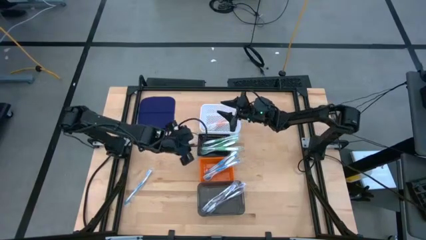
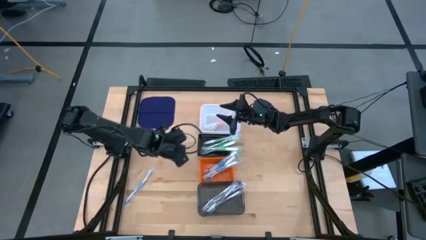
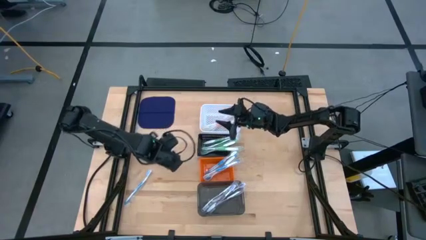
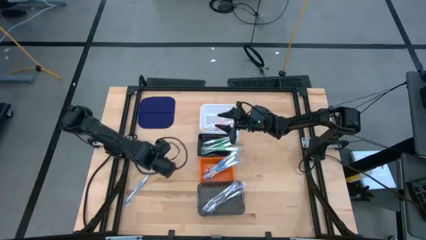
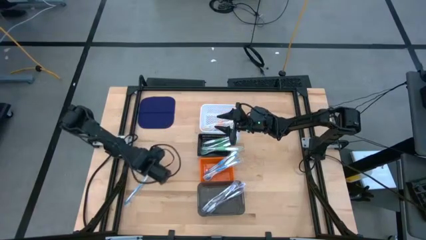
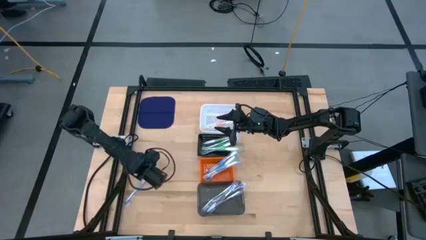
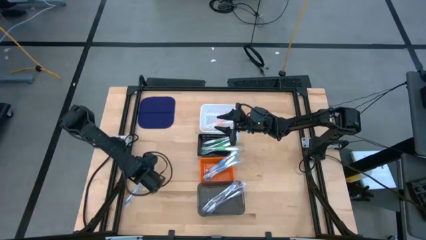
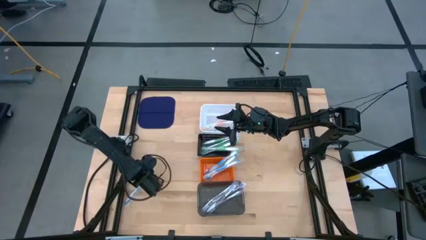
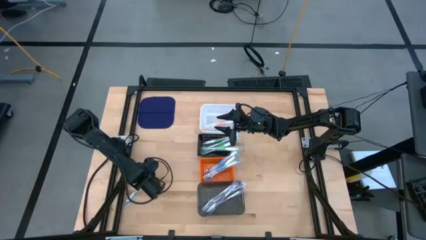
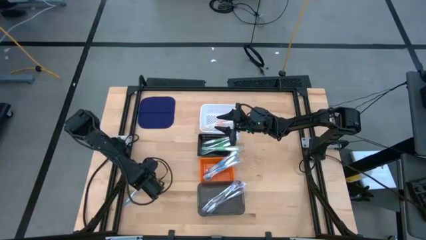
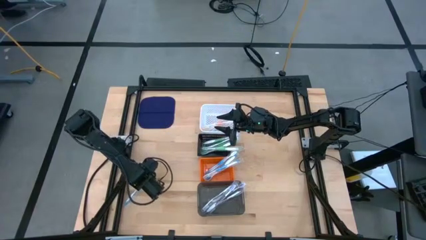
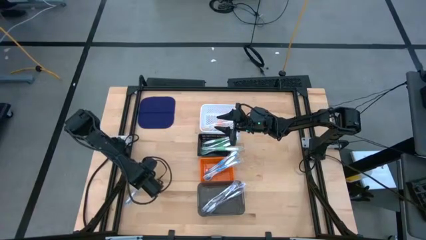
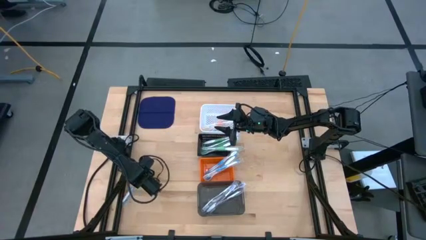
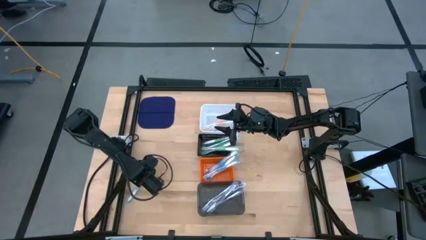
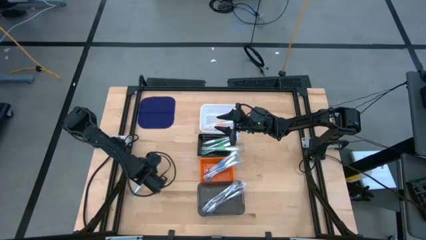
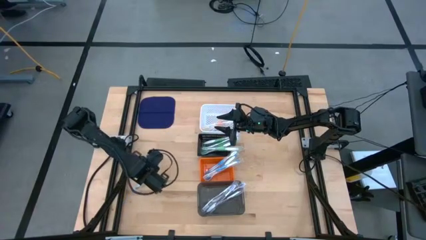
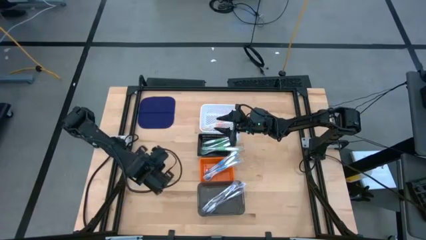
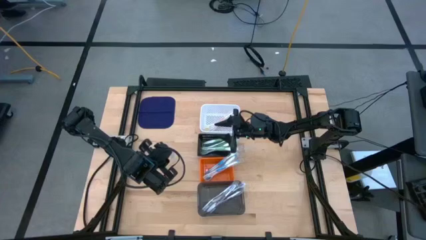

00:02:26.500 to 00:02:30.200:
Task: Pick & Place Toothbrushes
Put the blue toothbrush into the orange basket

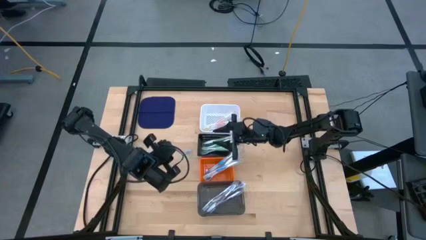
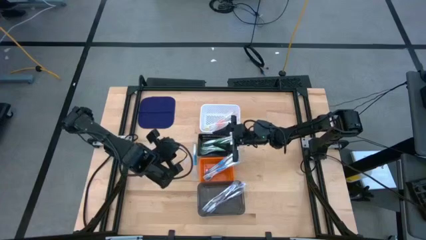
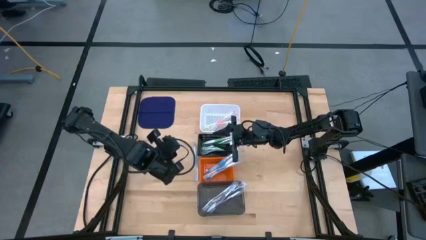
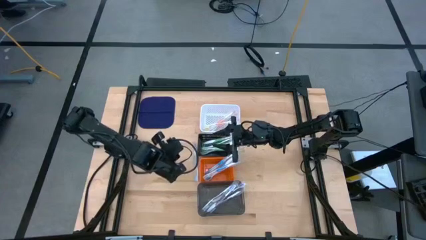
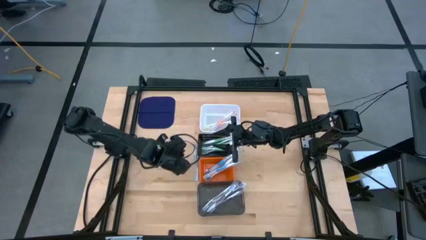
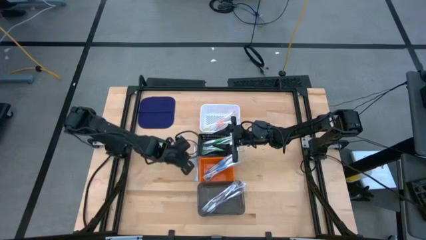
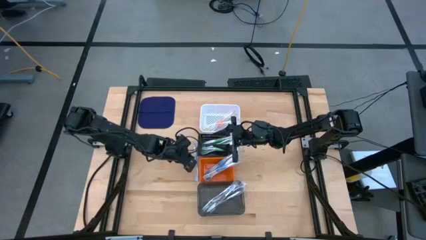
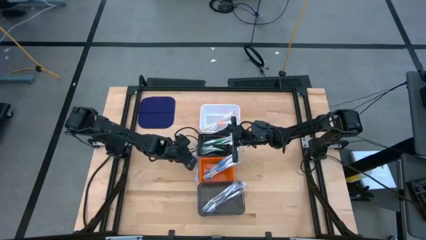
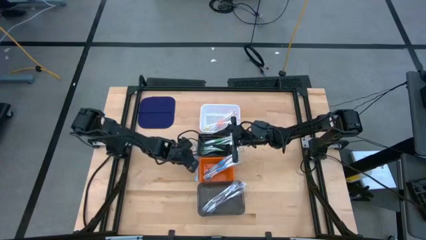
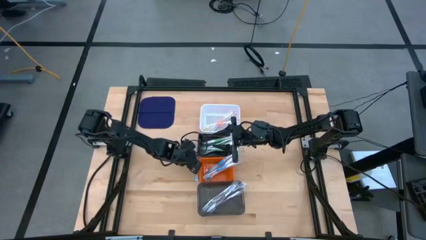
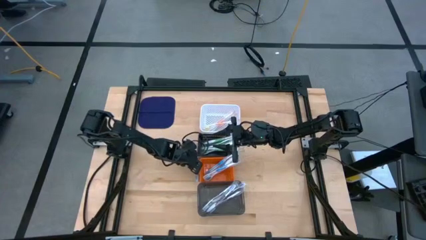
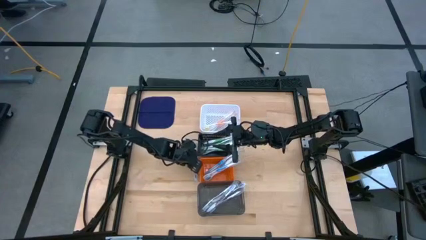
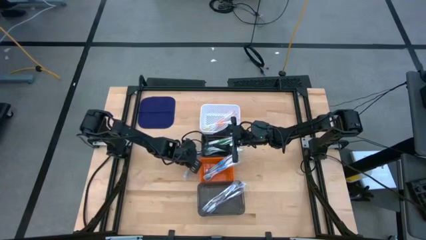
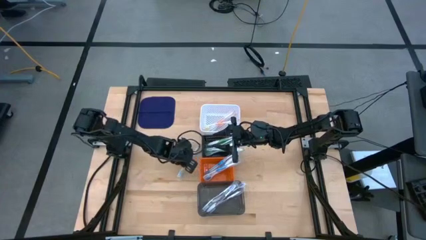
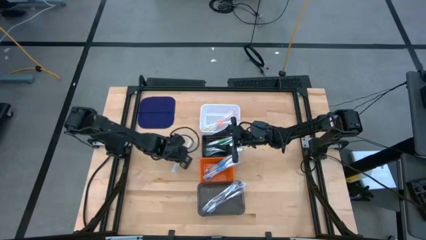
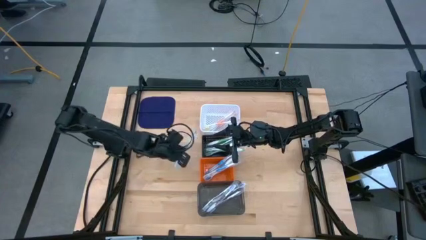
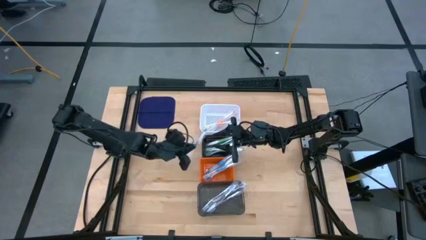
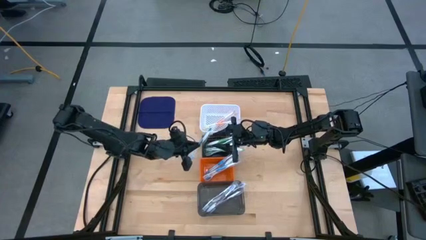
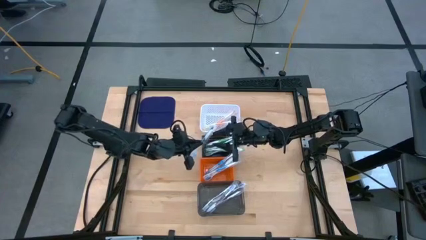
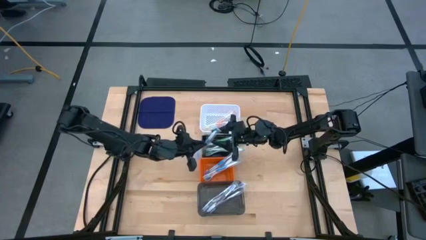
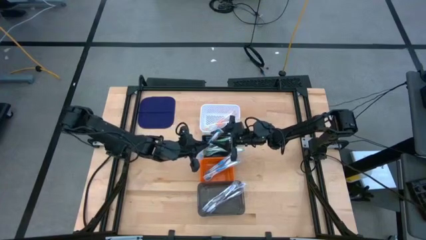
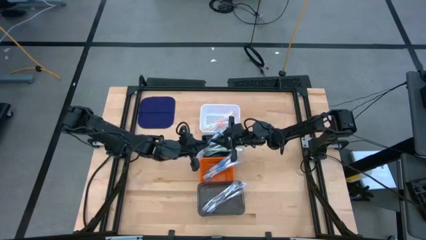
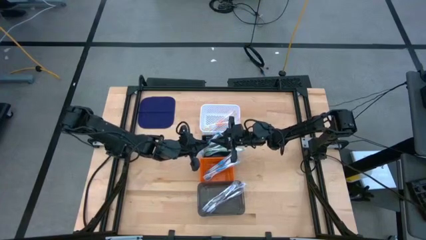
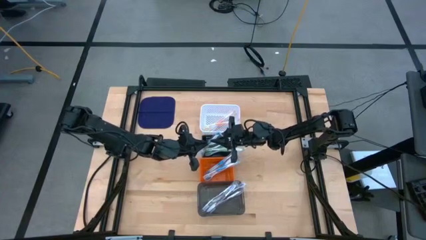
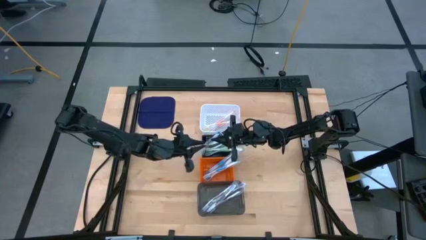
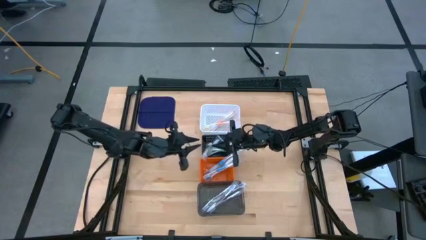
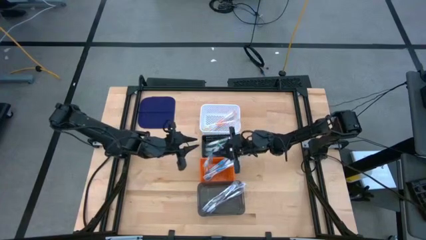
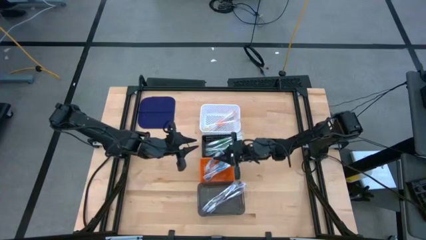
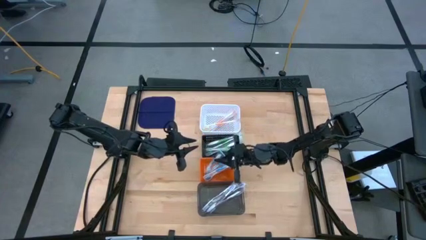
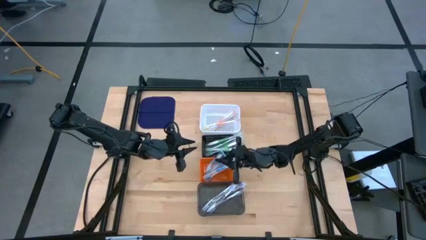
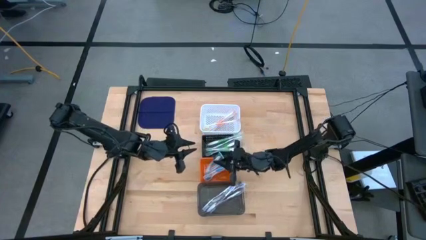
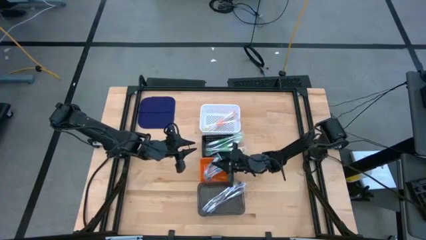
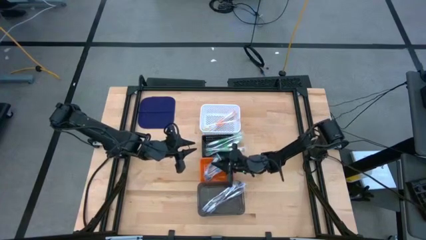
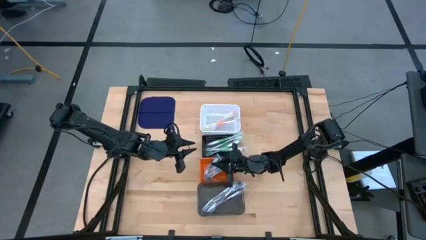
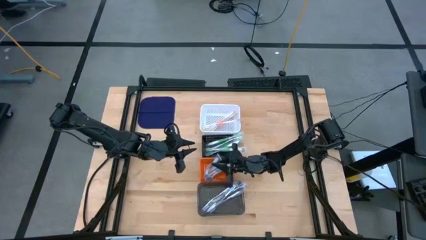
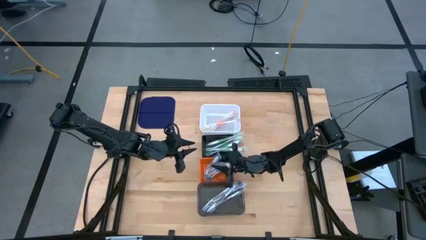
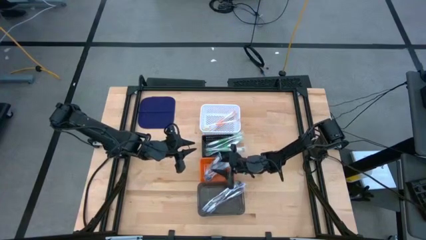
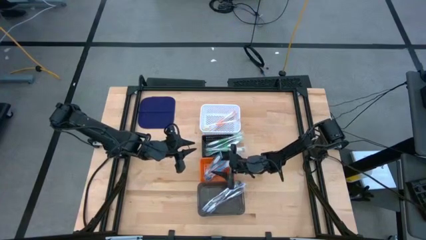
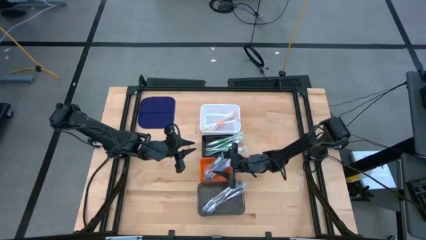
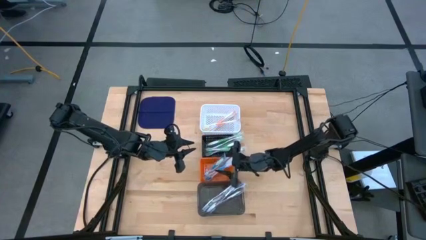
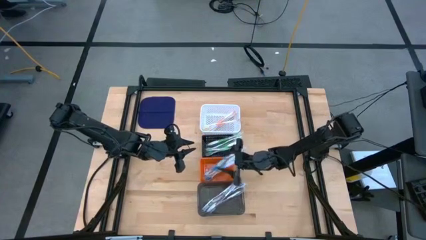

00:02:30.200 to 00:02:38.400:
Put the blue toothbrush into the orange basket

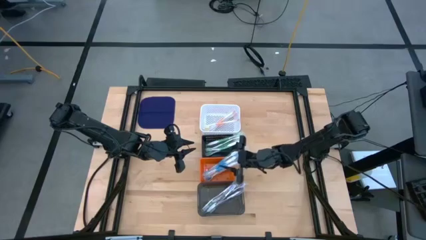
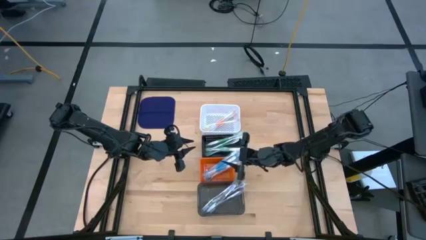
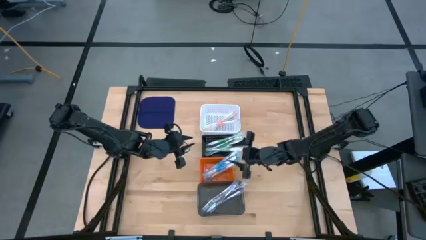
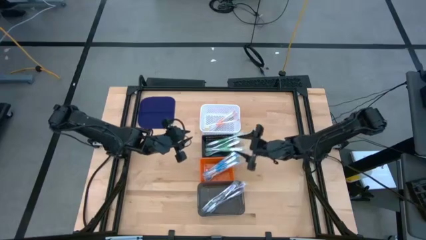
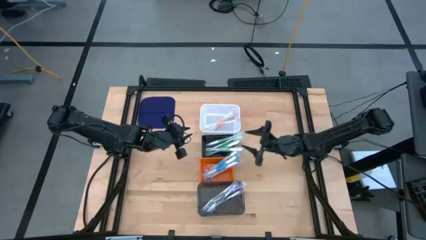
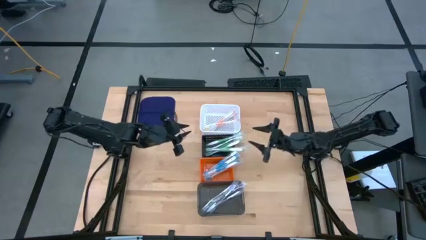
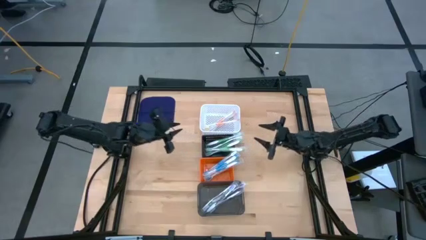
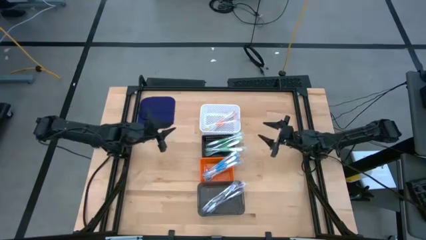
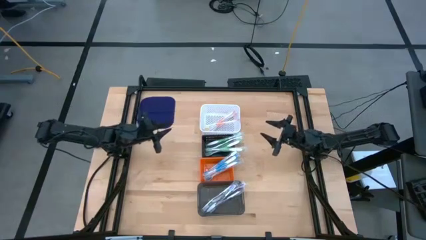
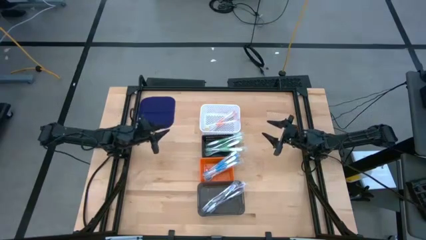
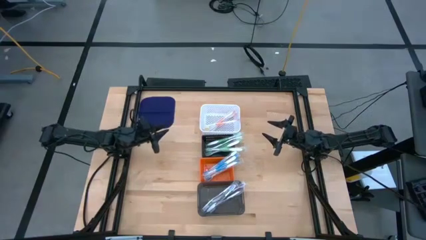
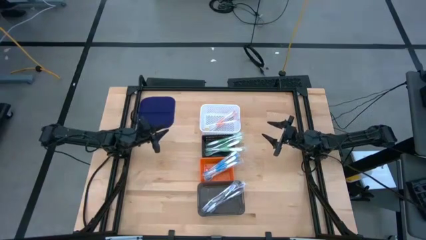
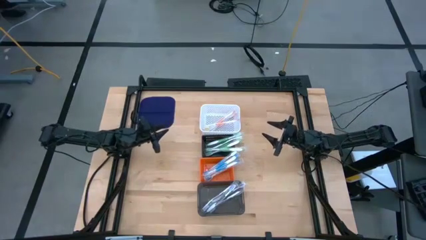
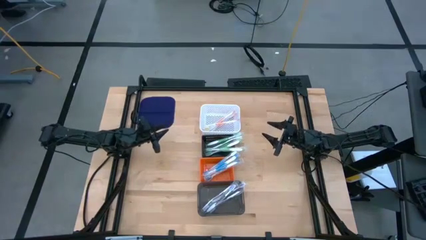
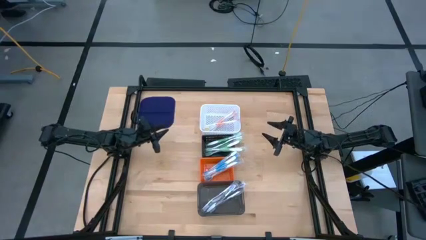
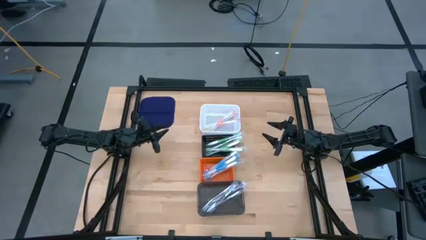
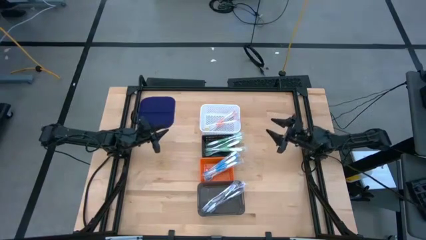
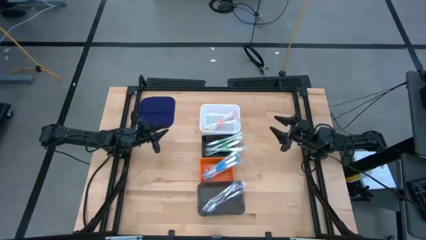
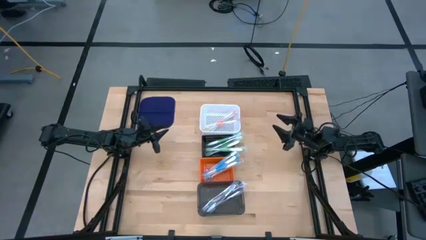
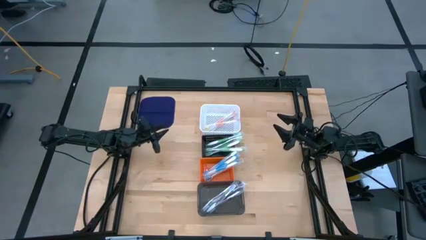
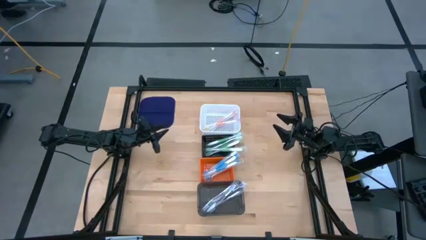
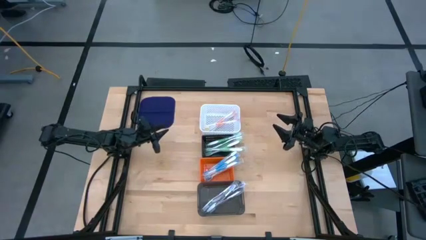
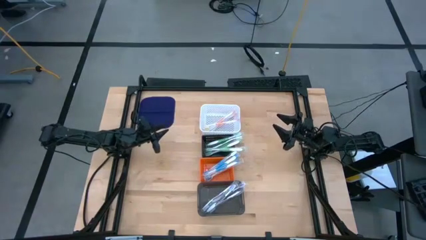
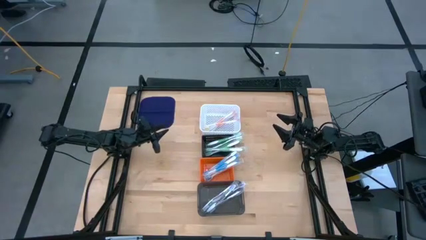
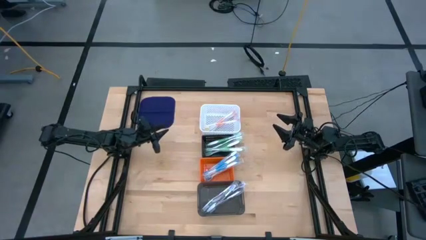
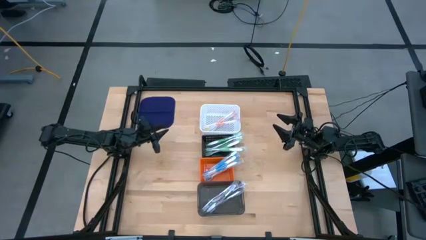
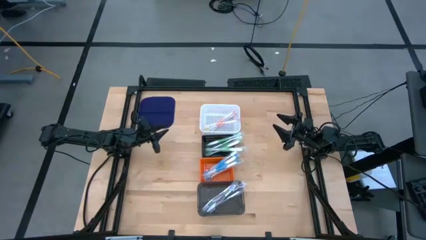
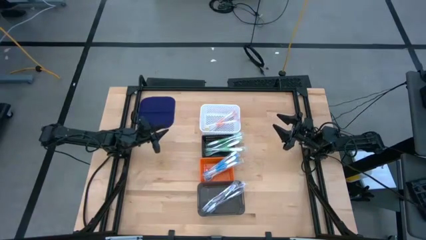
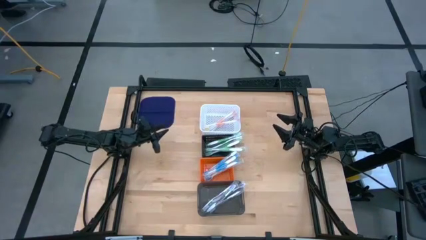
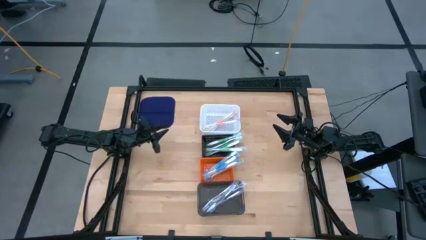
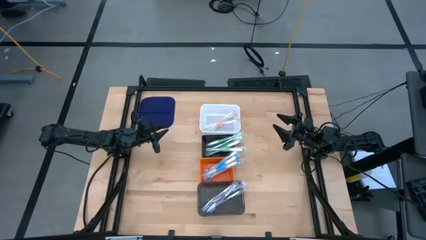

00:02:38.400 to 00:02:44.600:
Return to Home Position
